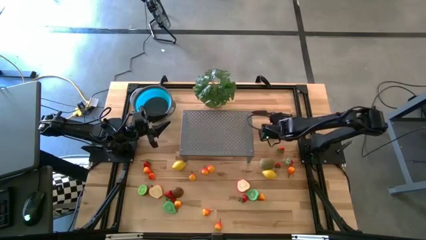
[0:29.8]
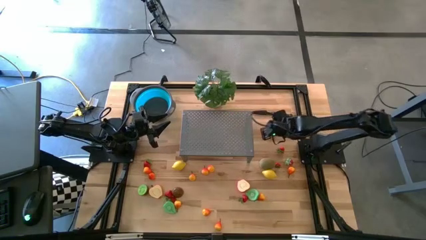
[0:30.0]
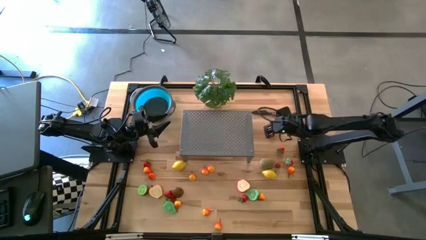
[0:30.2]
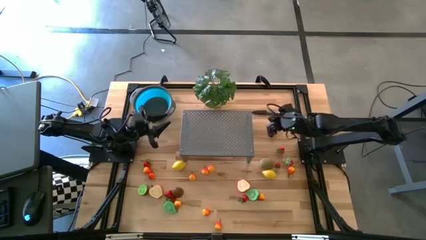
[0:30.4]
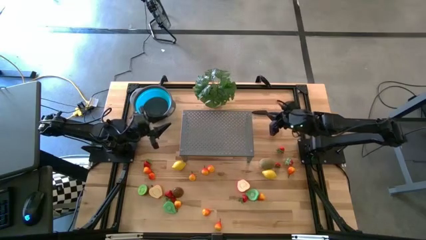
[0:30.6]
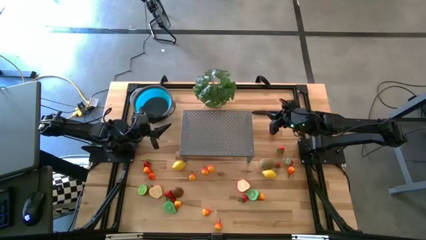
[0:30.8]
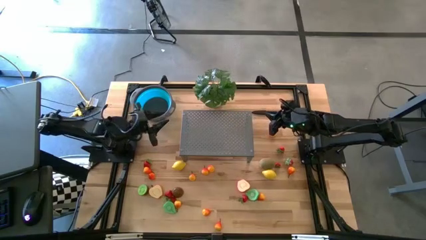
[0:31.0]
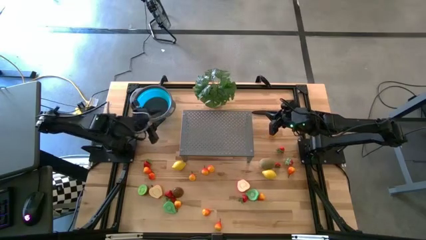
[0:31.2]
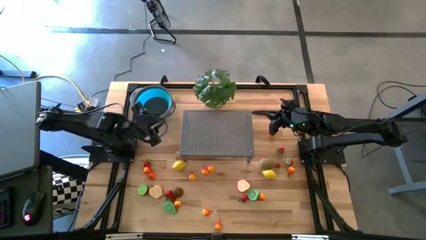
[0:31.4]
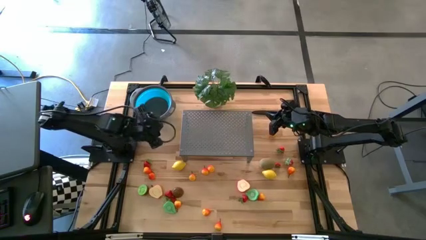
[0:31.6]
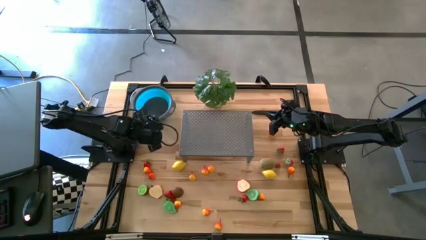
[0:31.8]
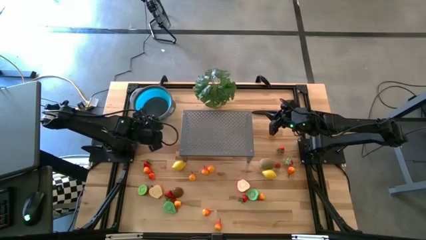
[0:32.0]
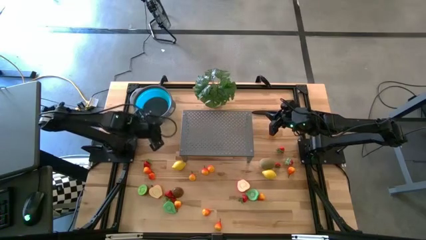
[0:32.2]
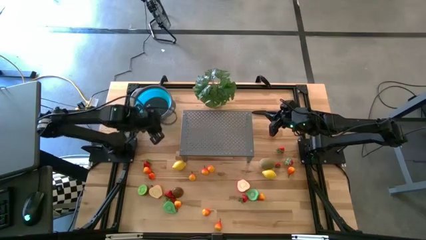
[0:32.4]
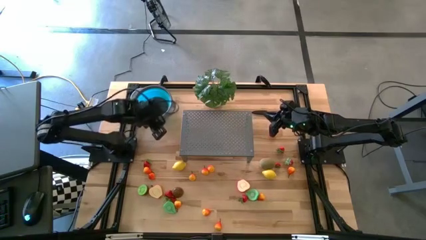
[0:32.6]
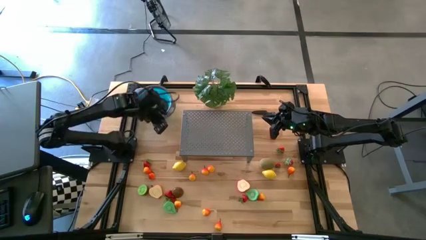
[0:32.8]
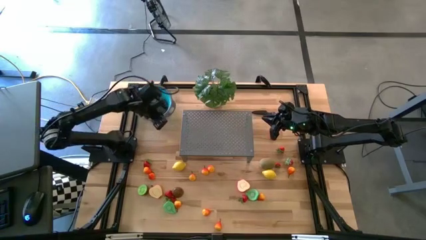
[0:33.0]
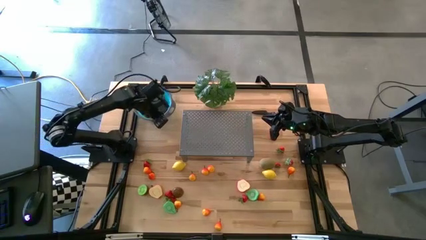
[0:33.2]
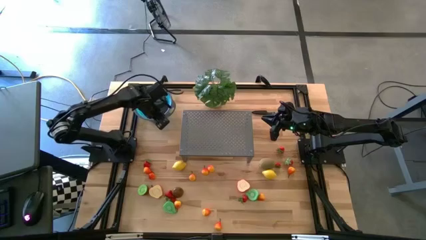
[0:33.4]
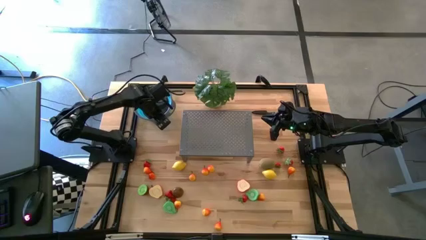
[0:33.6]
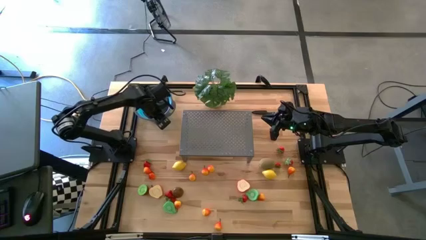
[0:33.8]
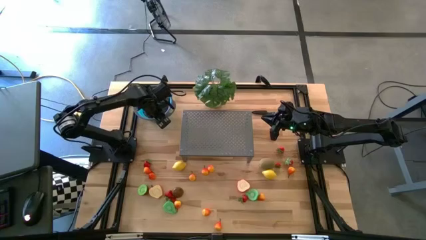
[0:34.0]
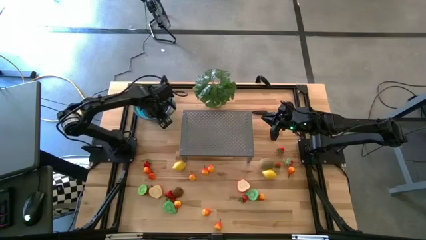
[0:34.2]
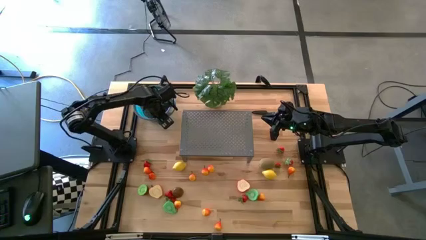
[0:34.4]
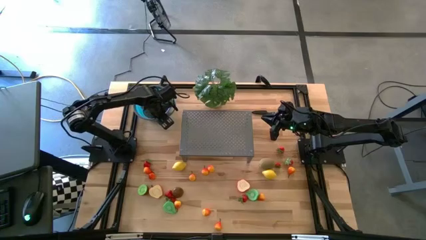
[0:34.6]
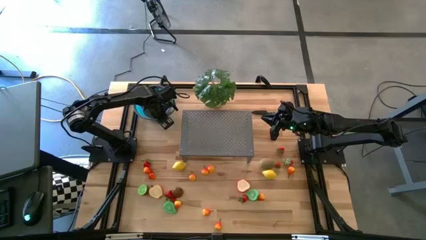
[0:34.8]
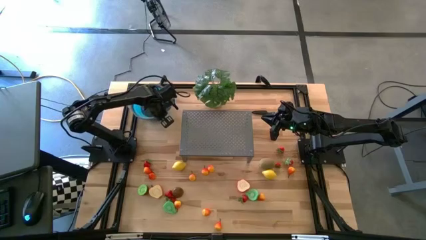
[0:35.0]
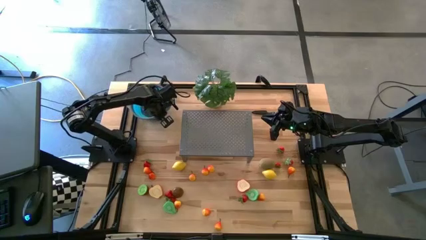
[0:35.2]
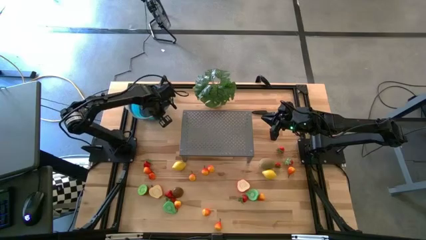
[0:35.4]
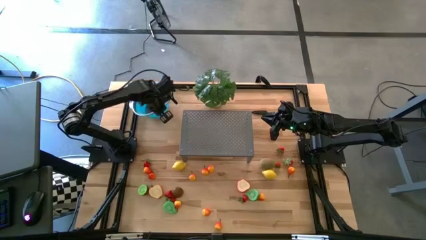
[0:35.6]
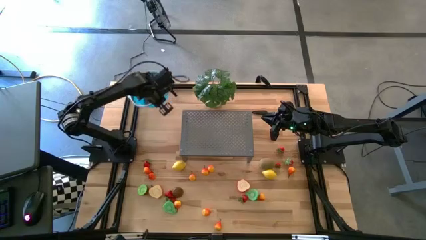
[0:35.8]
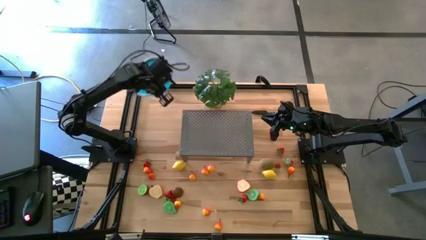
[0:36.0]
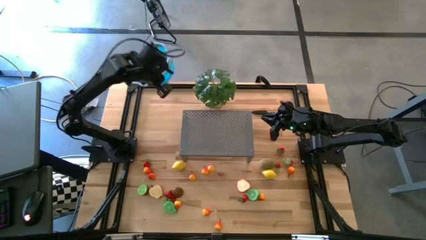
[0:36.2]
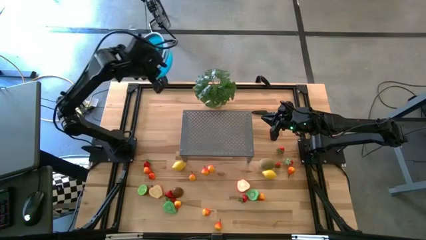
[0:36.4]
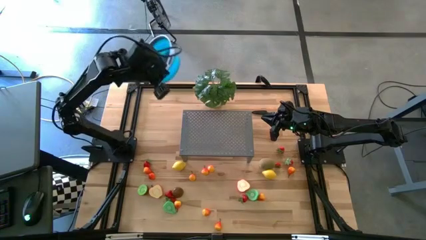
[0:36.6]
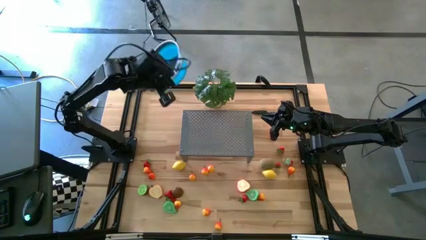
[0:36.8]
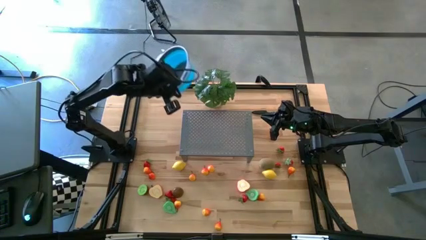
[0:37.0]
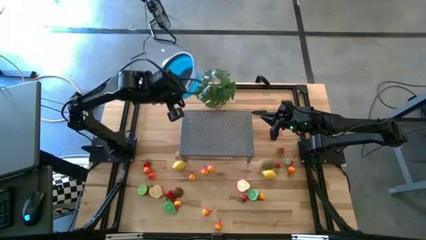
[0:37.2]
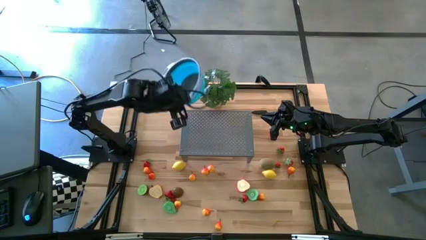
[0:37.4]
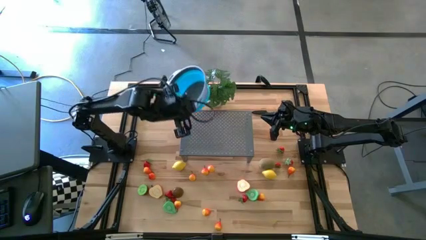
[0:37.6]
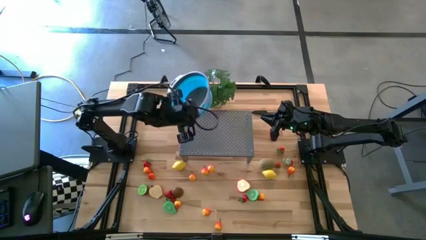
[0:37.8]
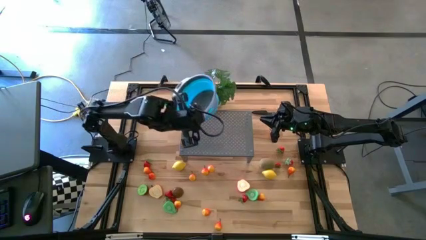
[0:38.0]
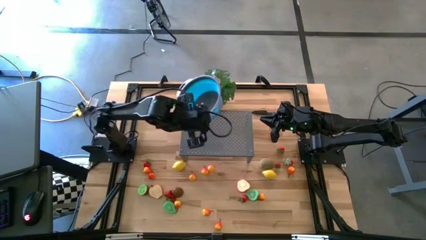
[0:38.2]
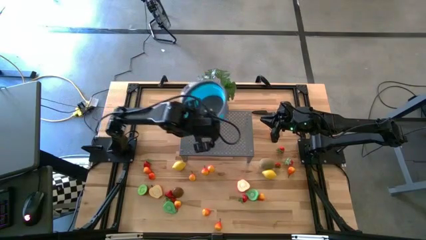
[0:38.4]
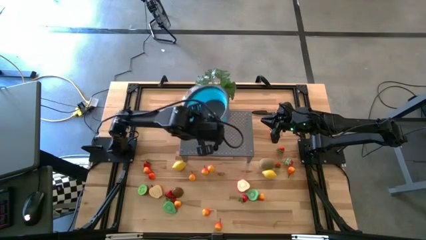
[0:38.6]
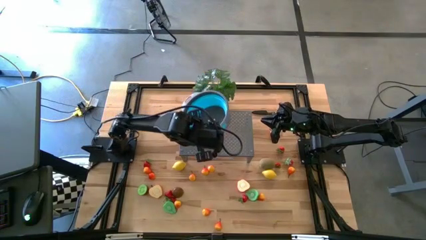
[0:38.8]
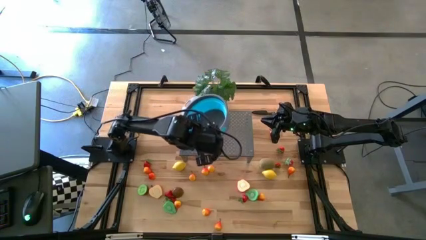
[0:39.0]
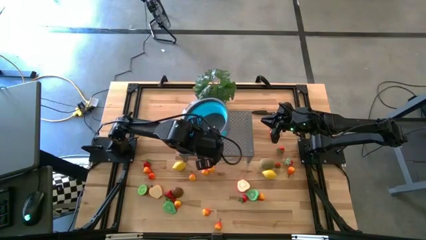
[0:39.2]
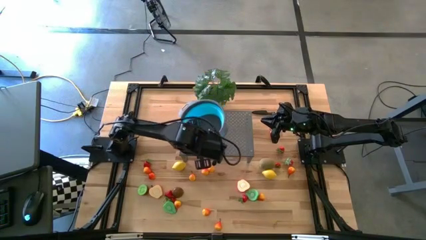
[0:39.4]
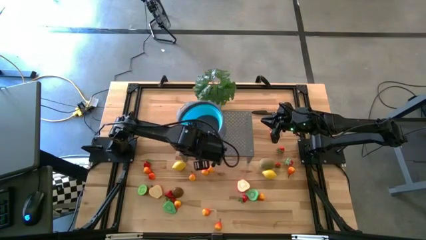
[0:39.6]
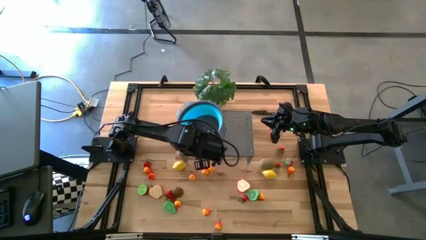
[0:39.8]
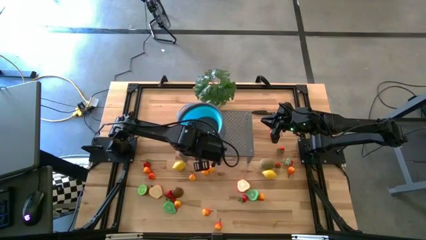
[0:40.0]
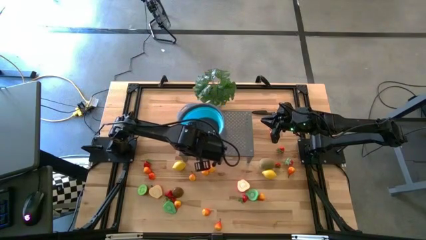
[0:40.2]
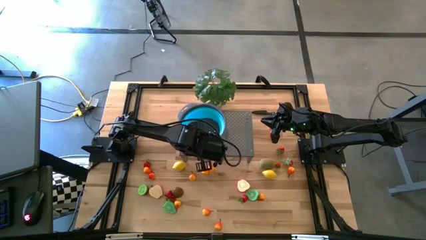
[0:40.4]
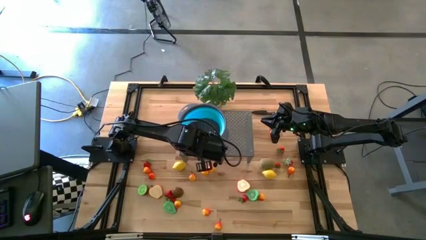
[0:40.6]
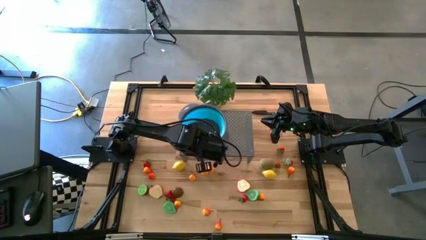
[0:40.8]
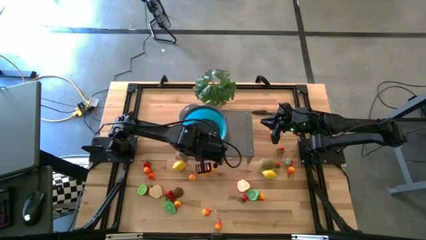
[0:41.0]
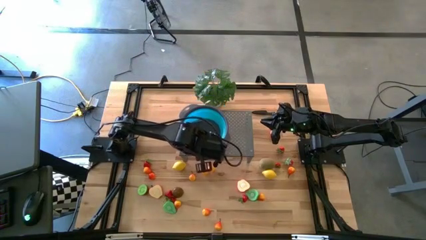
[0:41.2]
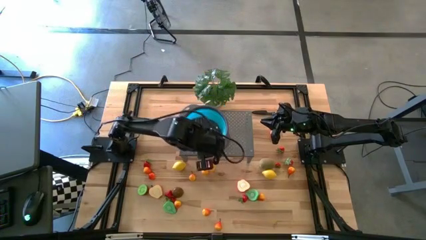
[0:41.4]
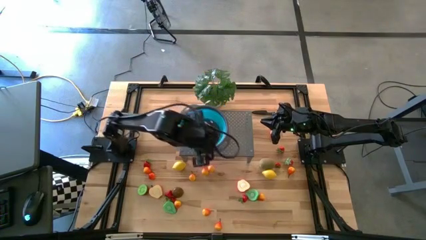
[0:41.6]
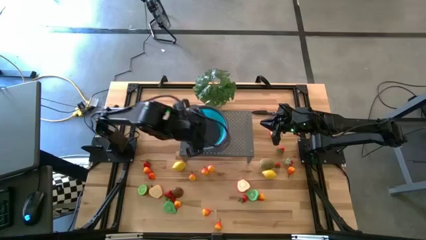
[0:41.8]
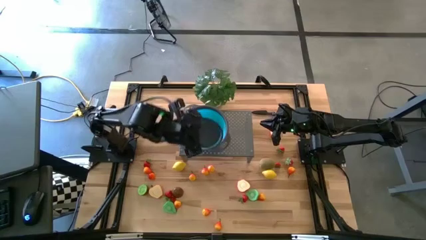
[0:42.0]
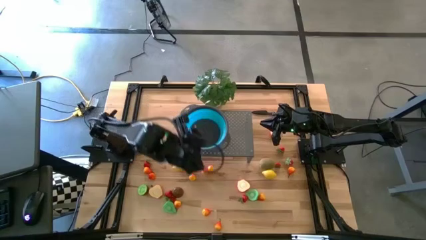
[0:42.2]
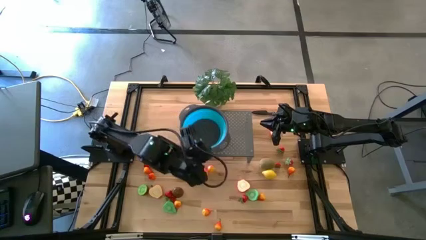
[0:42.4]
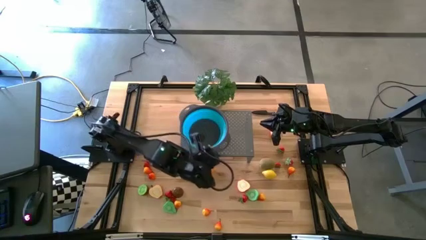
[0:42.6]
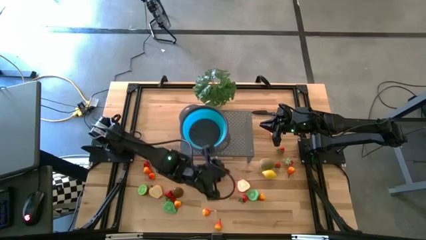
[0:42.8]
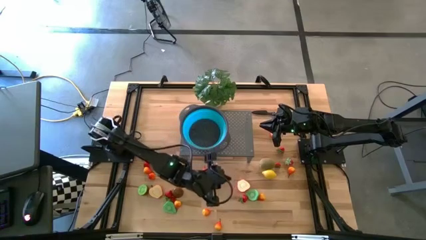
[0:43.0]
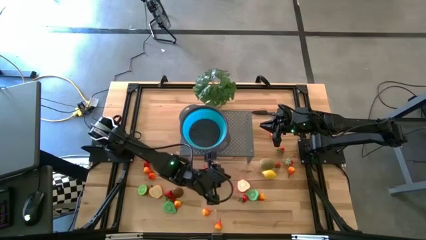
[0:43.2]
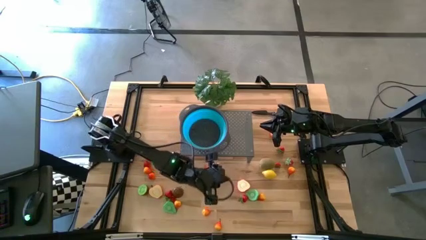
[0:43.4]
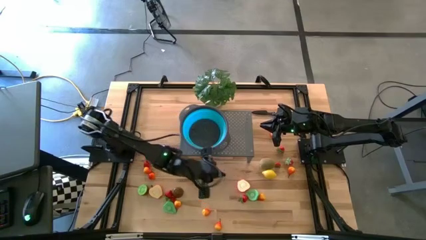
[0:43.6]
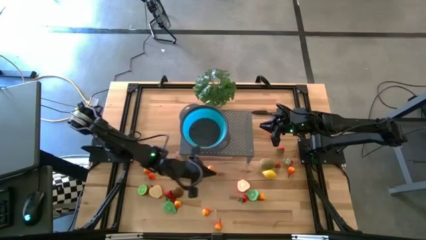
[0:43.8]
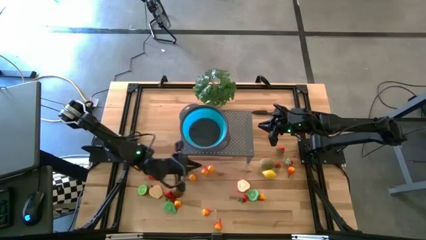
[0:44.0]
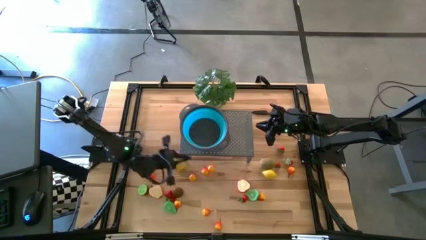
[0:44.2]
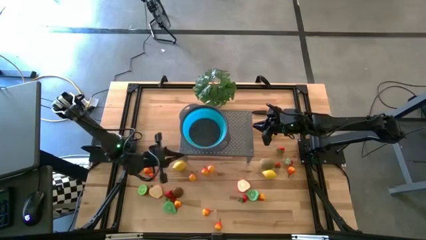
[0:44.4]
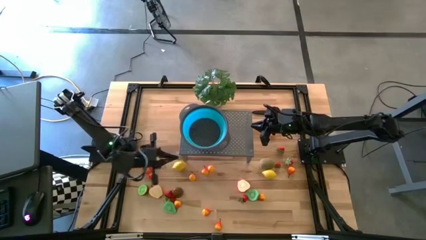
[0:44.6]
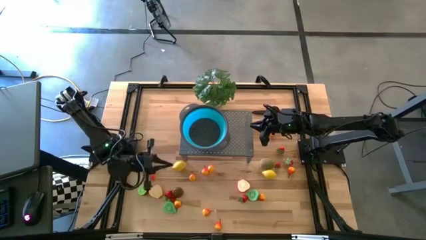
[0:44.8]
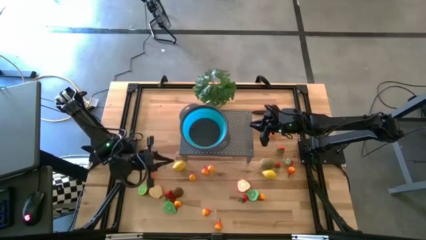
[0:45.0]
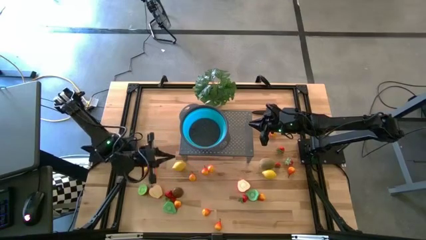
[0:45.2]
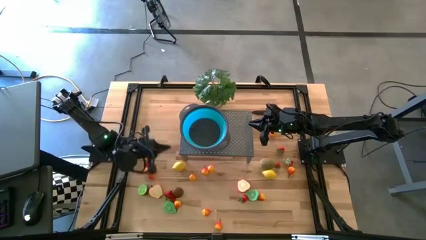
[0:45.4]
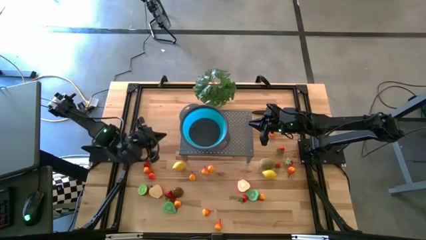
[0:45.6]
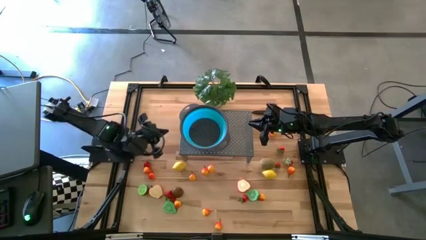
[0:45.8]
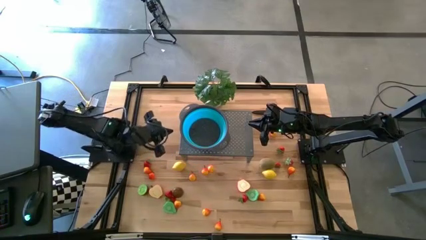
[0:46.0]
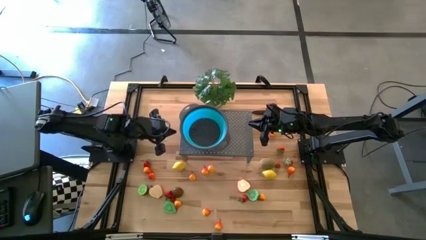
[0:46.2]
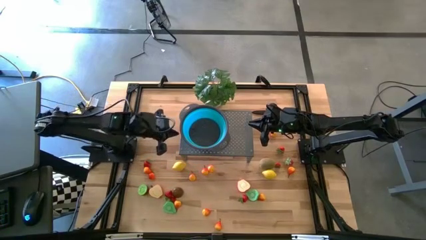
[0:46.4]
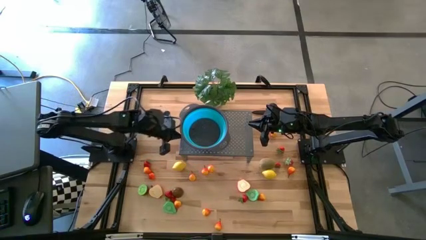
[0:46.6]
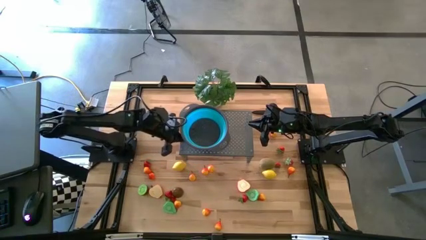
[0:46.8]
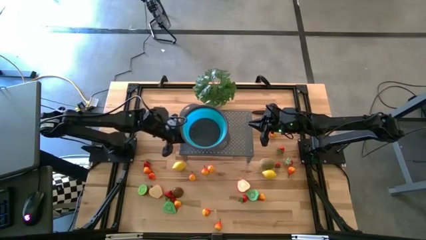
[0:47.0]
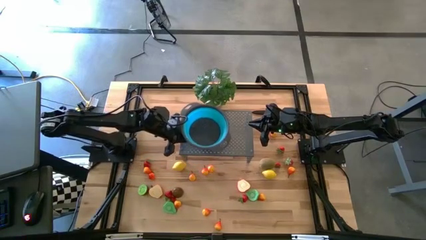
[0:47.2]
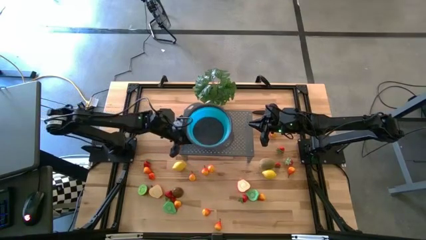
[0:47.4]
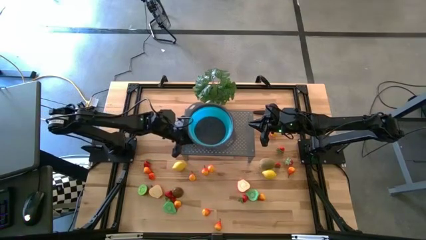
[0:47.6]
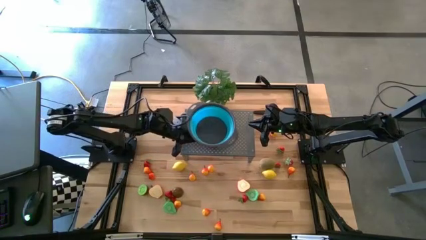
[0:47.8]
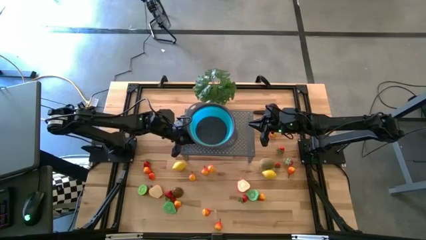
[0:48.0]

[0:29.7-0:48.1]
Task: Pick & Place Fruit
Put the blue strainer bowl on the shelf
